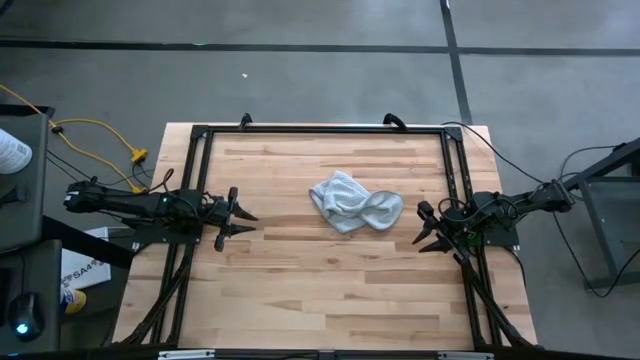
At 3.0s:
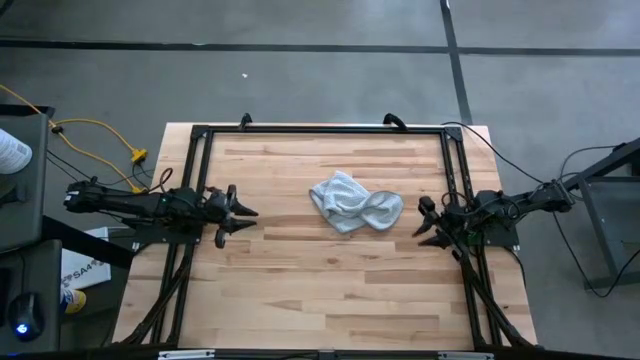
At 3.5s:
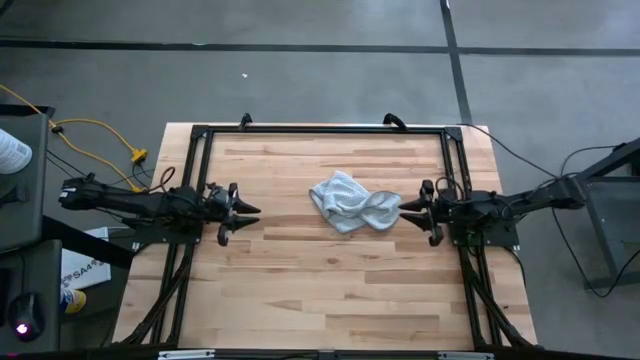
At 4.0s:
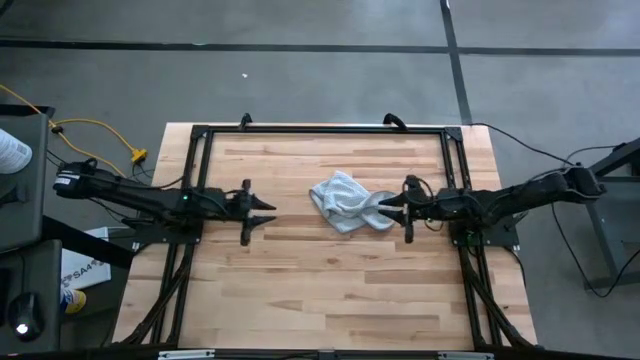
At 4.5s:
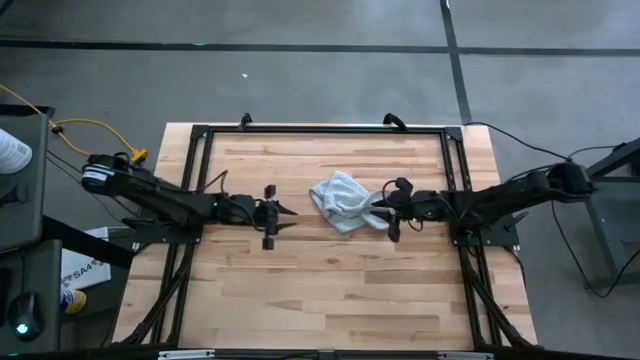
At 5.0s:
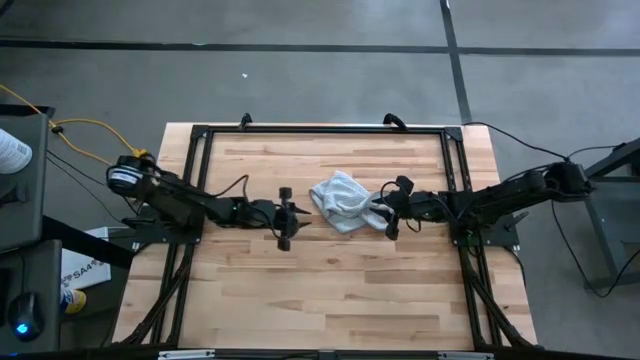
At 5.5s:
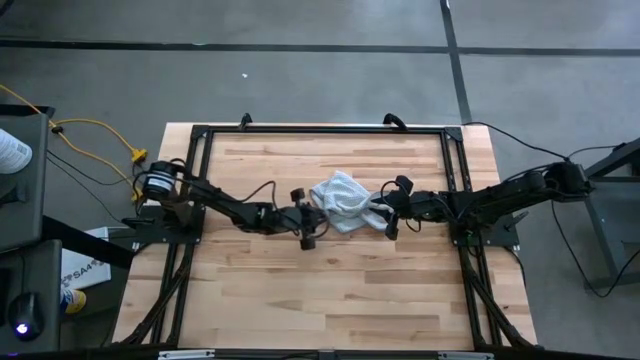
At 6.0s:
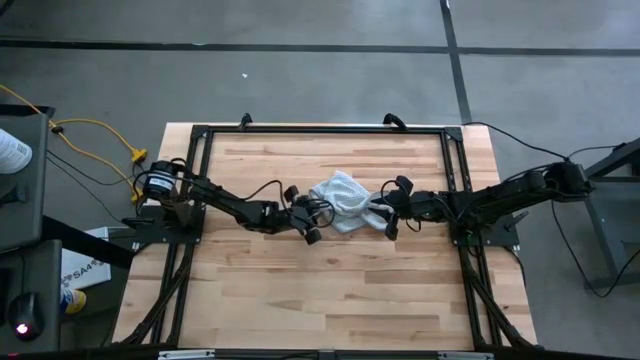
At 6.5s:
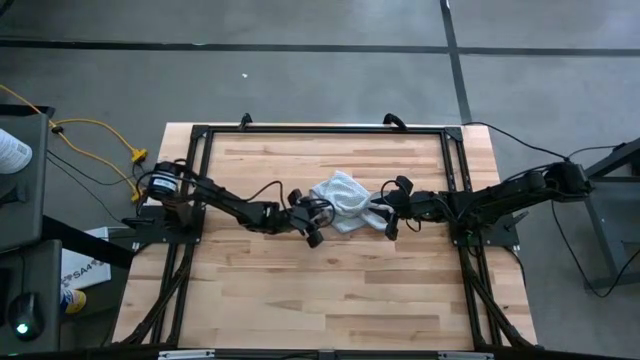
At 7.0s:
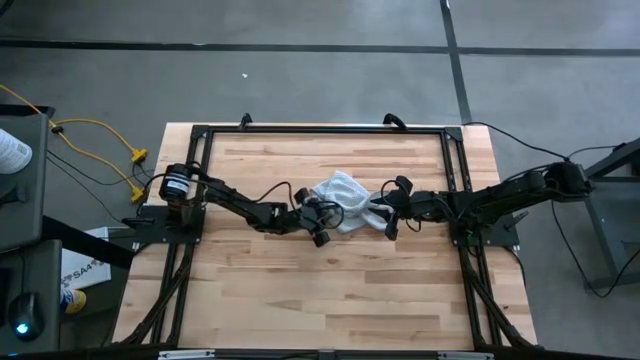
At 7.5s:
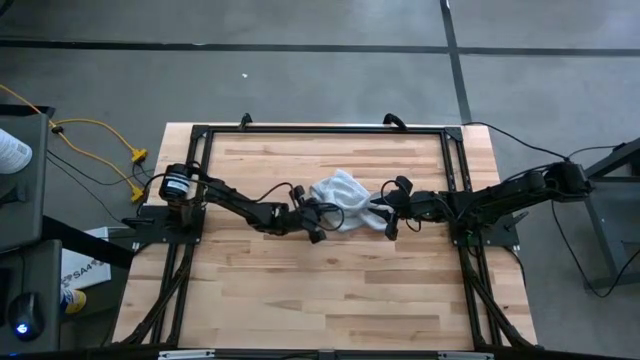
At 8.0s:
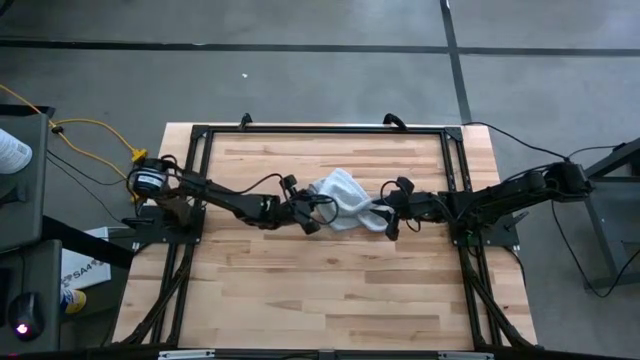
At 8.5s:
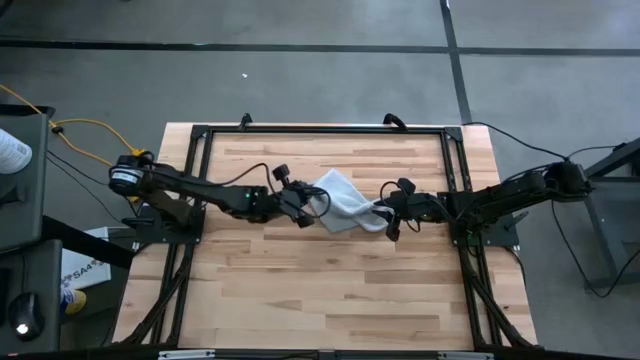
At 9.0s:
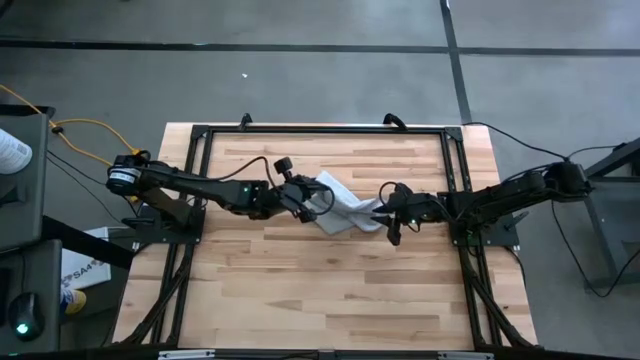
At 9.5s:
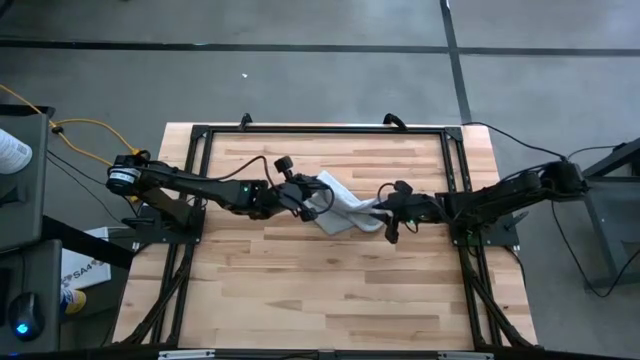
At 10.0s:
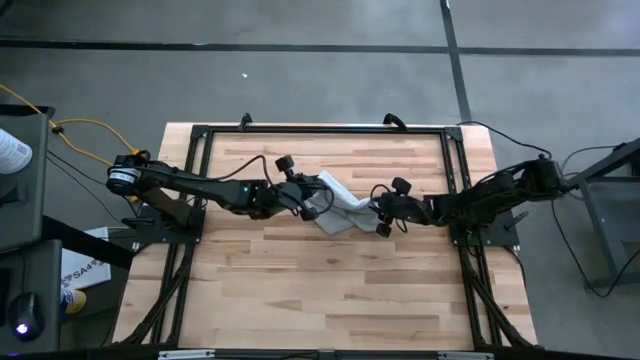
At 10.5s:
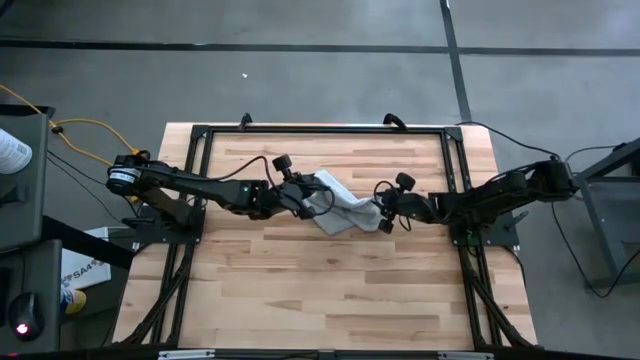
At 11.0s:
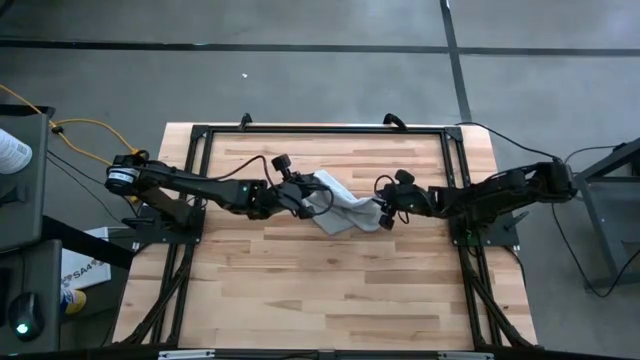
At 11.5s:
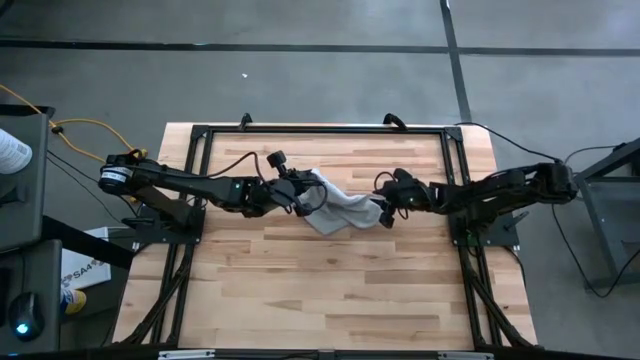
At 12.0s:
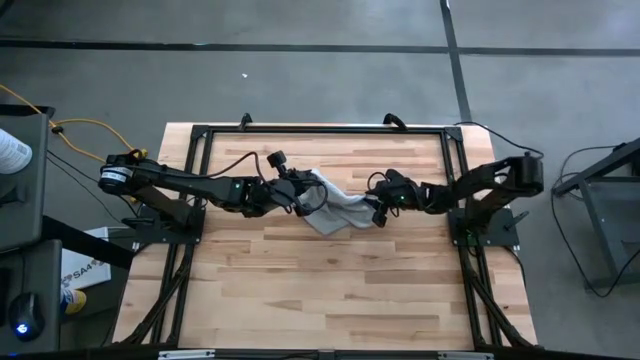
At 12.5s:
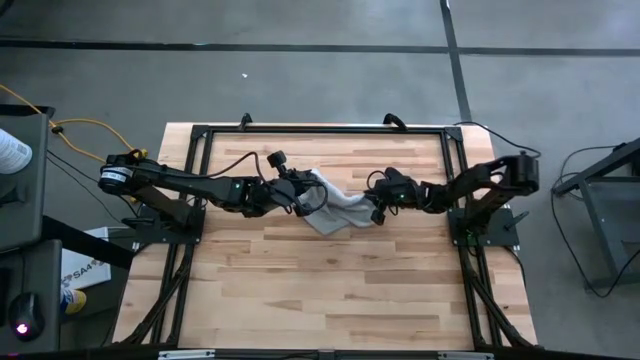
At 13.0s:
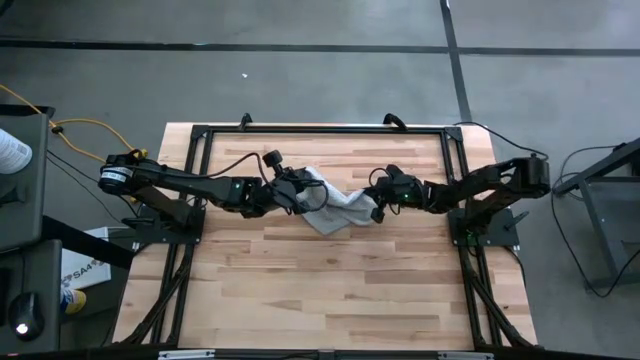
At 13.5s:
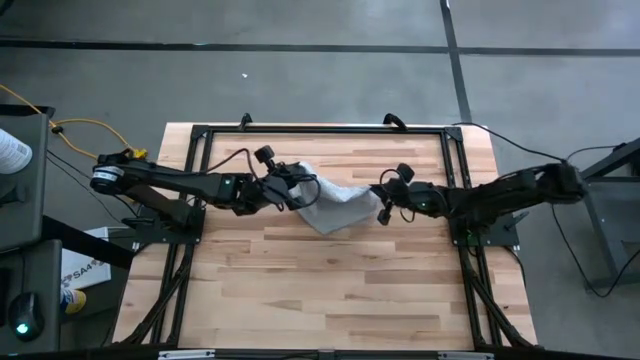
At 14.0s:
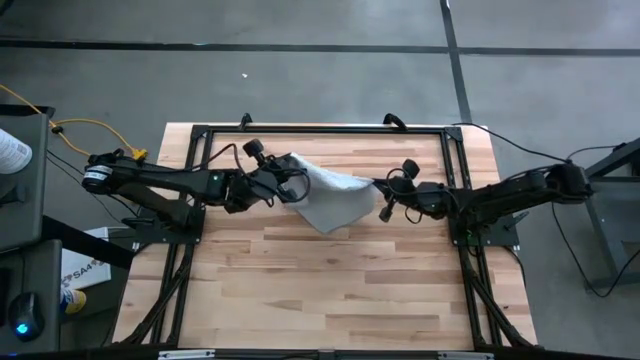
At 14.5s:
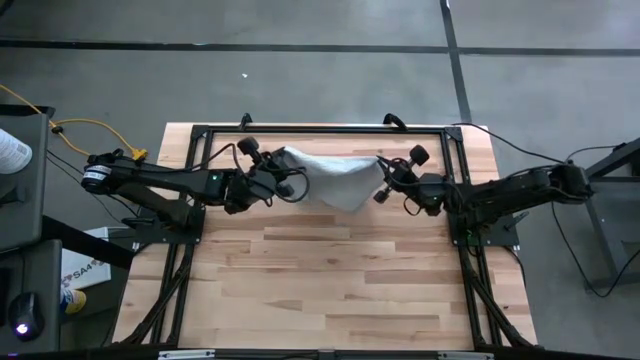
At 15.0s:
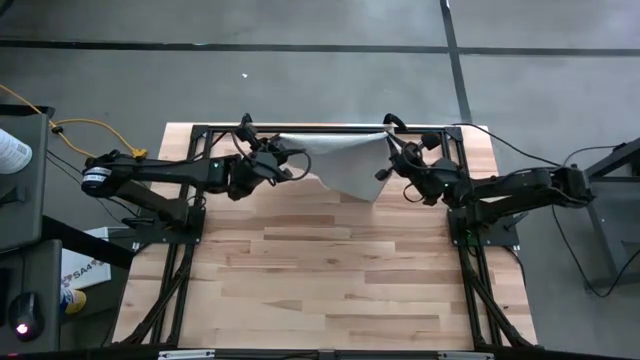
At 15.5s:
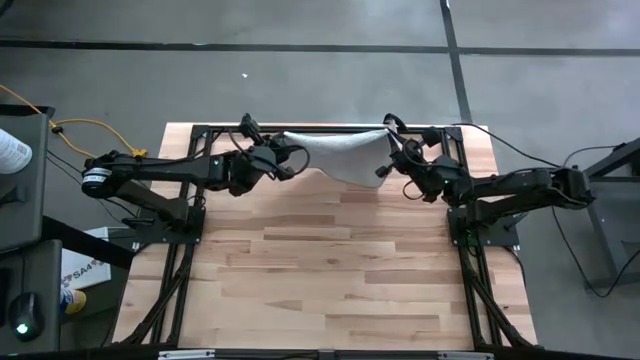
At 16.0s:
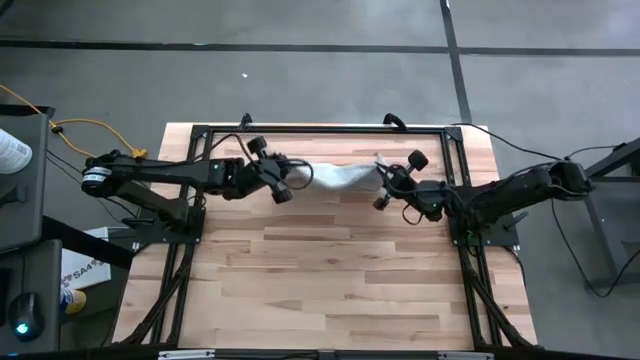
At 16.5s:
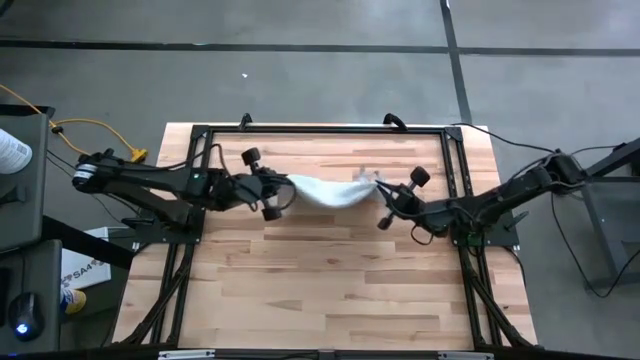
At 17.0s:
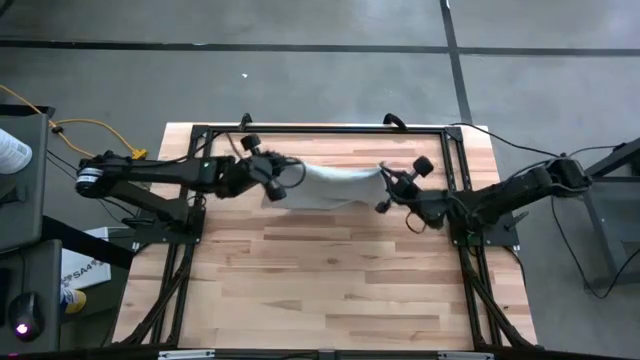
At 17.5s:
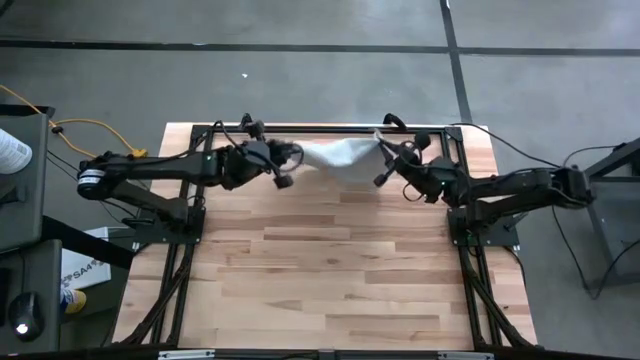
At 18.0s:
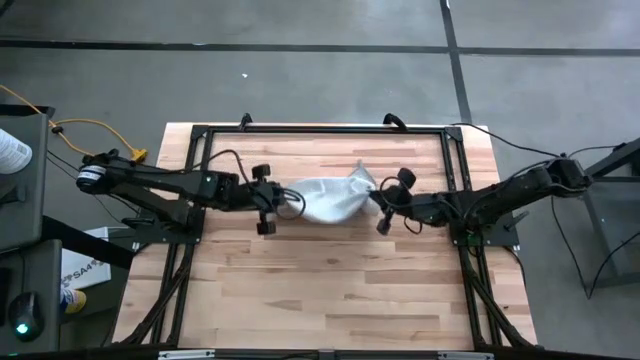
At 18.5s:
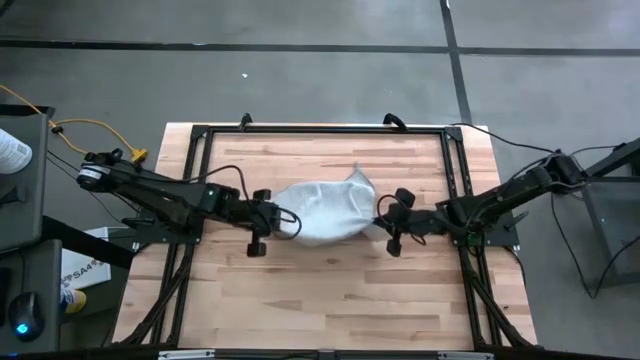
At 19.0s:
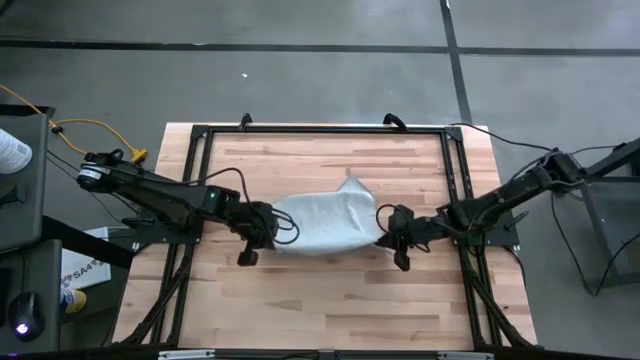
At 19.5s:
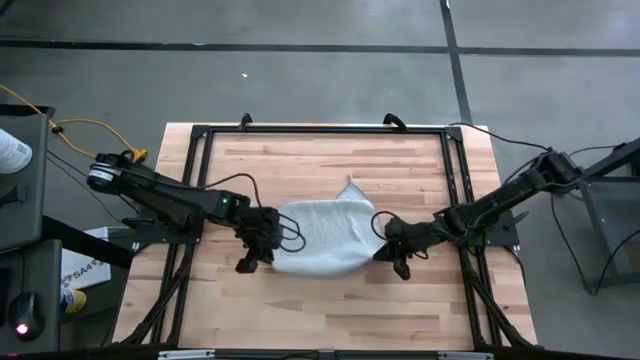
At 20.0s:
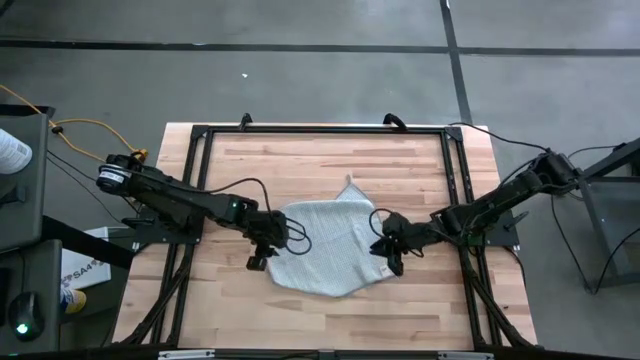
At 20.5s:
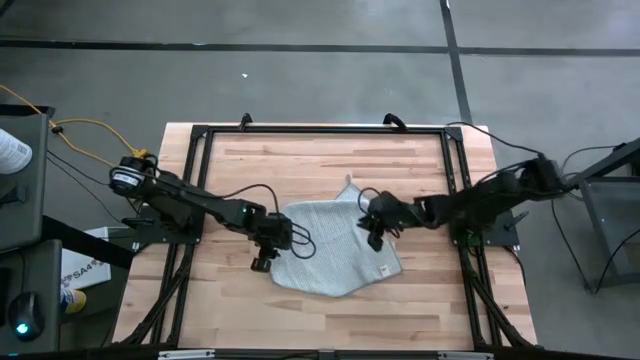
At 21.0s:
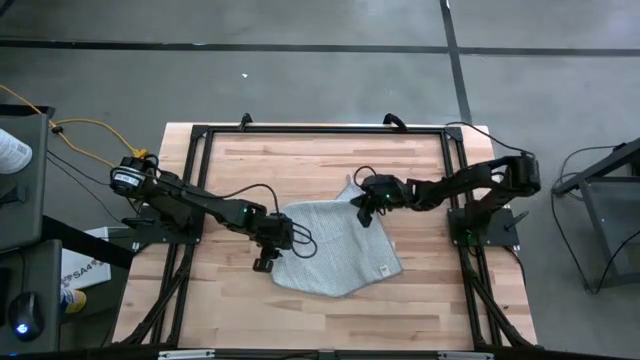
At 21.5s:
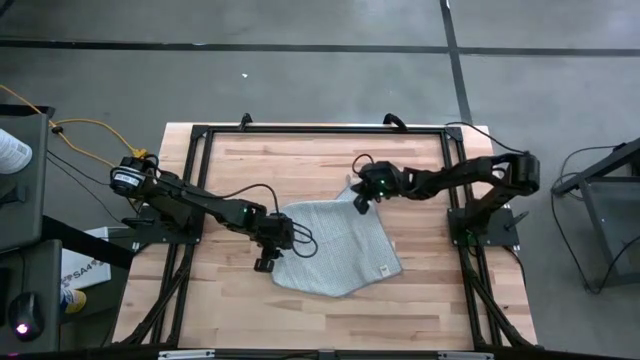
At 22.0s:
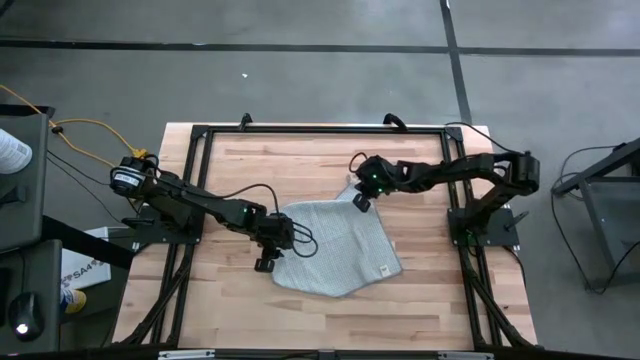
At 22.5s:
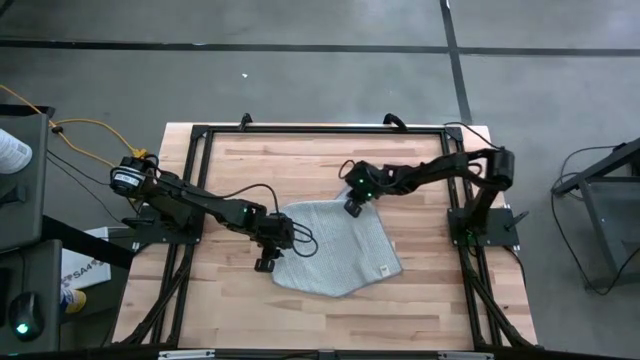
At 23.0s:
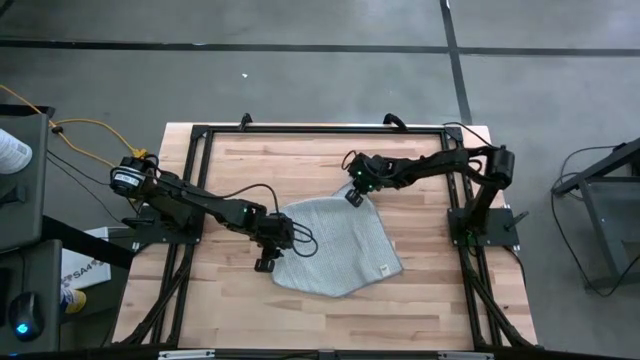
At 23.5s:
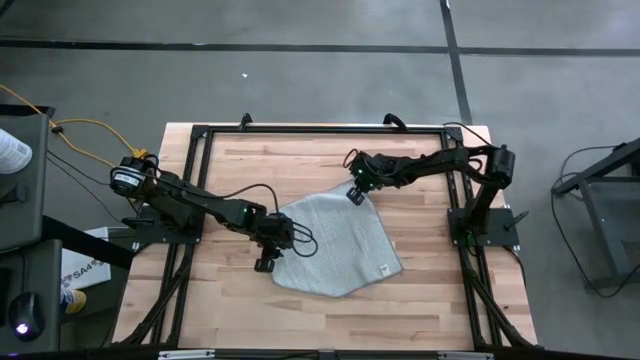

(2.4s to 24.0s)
Task: Fold microfiber towels
Fold the gray towel
